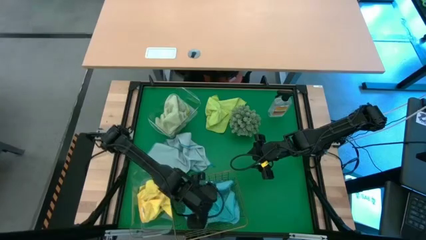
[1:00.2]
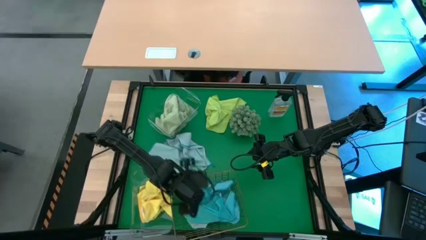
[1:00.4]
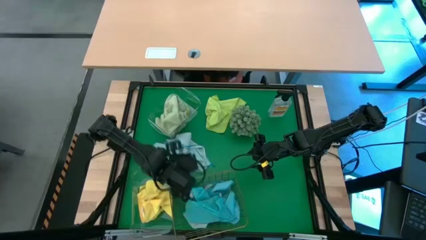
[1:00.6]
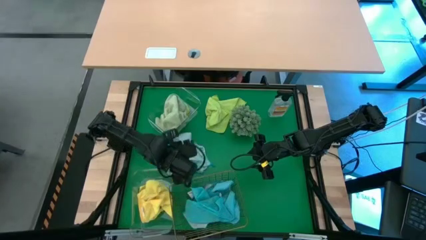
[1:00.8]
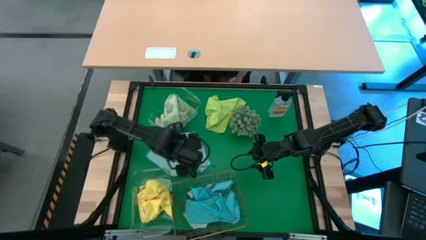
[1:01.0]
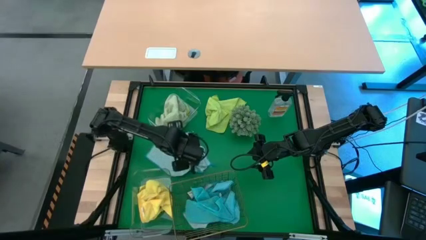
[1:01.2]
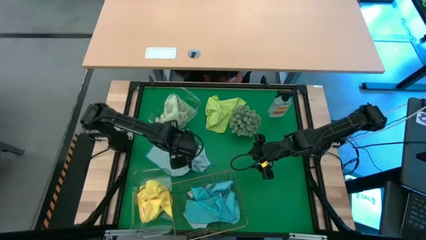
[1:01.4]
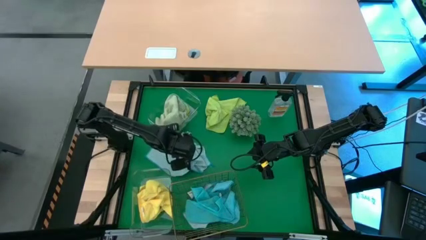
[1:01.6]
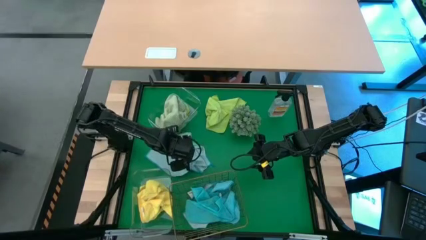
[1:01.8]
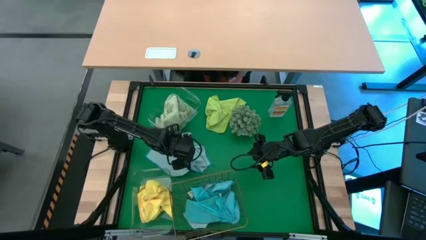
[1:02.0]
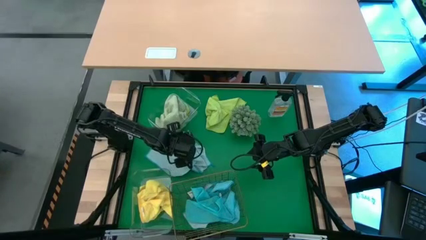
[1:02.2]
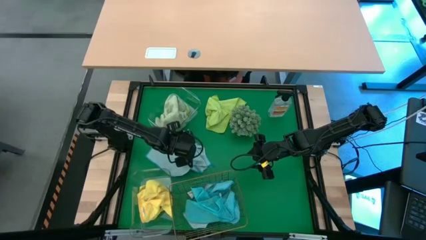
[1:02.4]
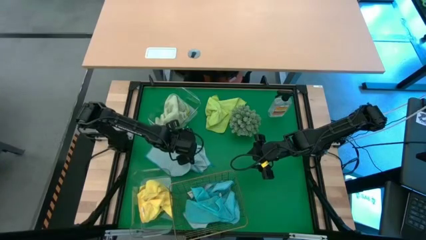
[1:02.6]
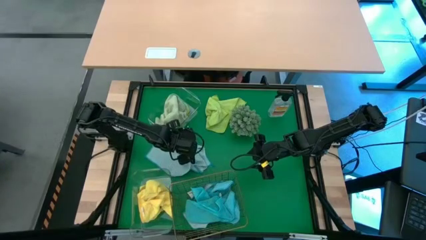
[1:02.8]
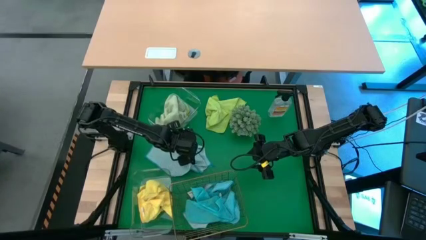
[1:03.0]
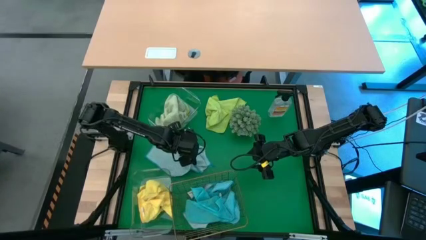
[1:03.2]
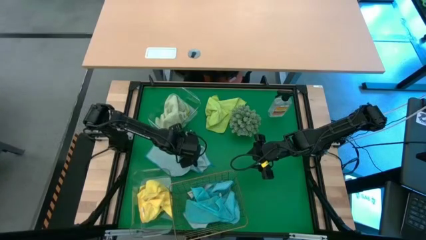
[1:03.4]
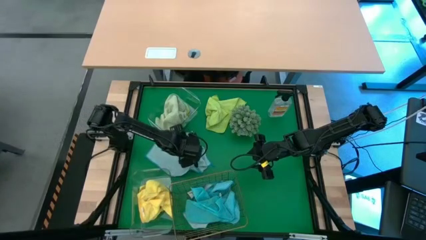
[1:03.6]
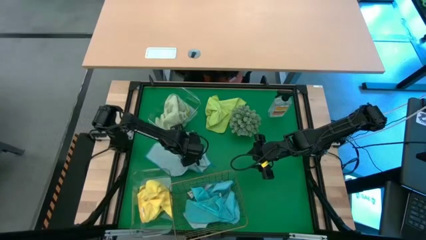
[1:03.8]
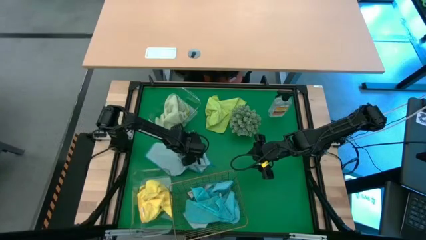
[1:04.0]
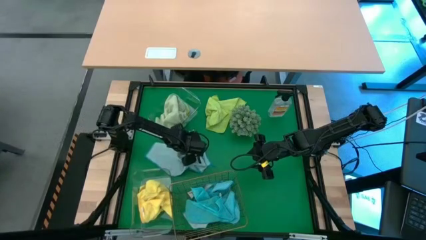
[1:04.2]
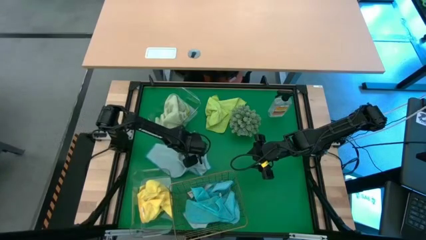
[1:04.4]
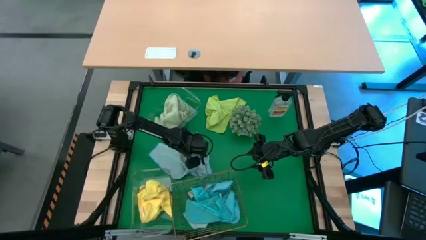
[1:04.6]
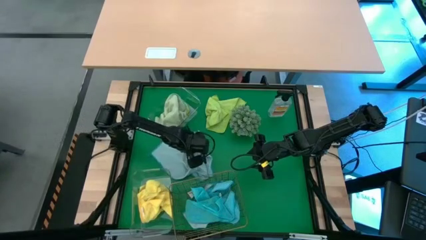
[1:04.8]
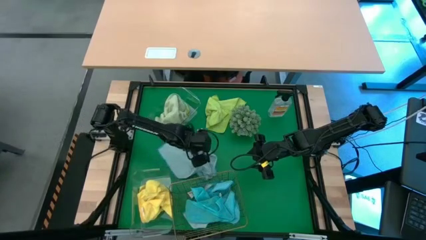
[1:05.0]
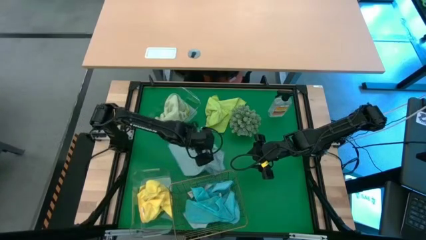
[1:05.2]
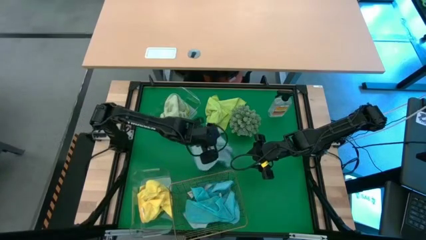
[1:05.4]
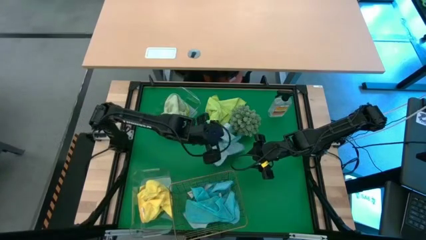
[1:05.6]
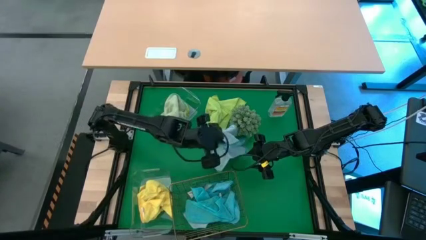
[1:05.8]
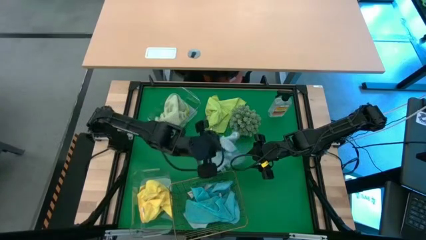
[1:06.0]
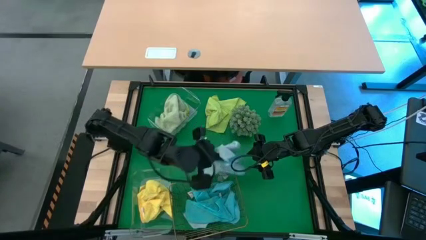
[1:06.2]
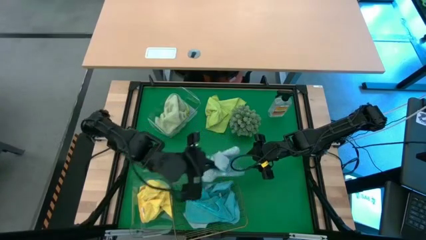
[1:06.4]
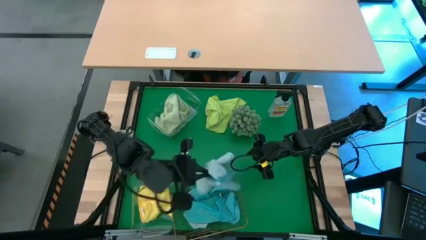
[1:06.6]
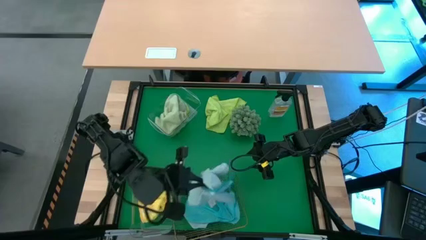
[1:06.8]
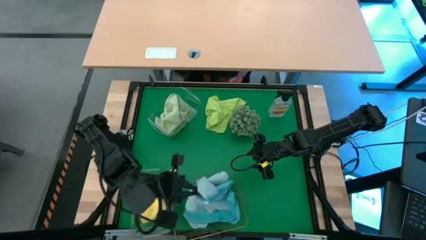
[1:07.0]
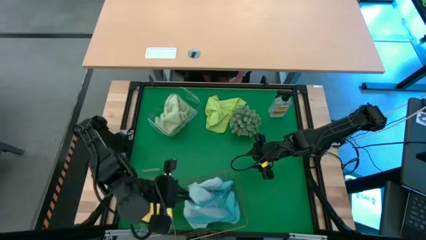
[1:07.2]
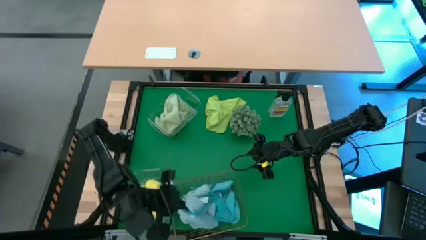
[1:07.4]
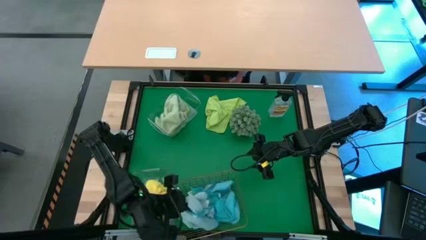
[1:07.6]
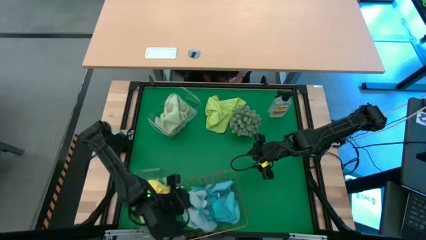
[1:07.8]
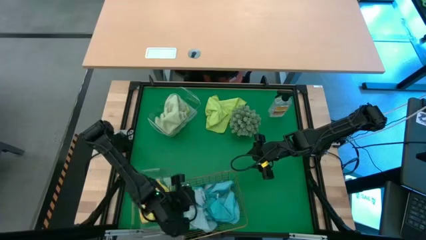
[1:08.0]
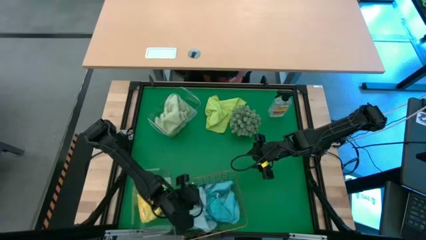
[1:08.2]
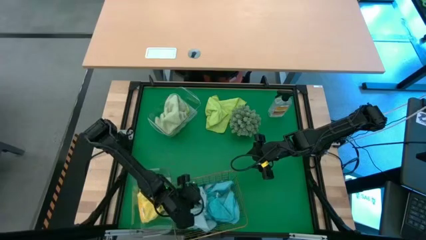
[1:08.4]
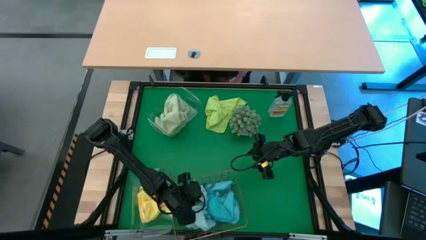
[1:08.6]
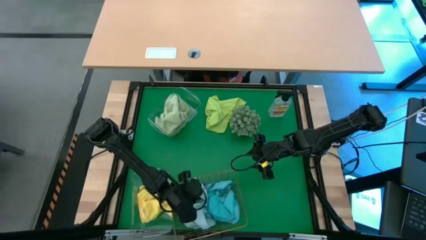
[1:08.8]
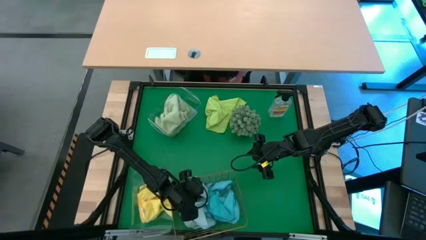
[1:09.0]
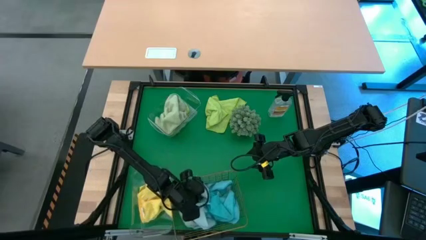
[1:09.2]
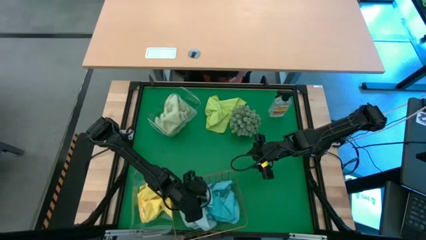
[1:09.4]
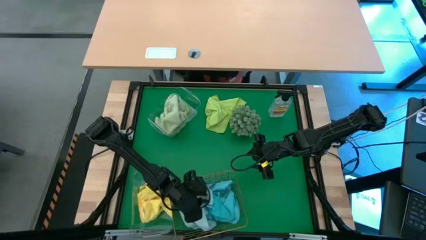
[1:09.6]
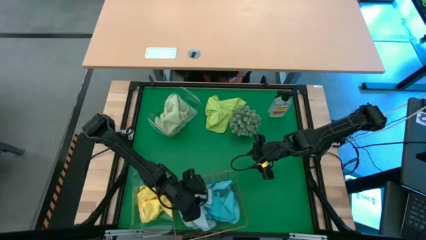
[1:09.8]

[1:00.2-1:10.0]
Task: Sort microfiber towel by color & place in baskets
Put the light blue microfiber towel into the wire basket

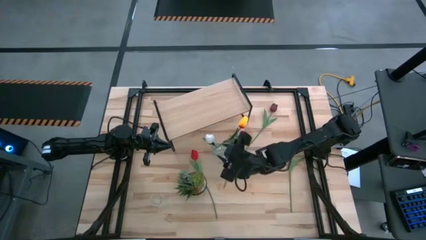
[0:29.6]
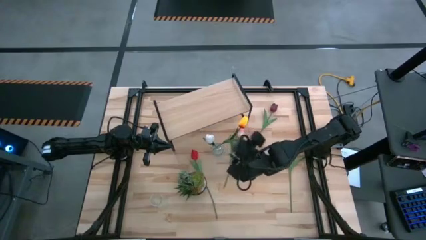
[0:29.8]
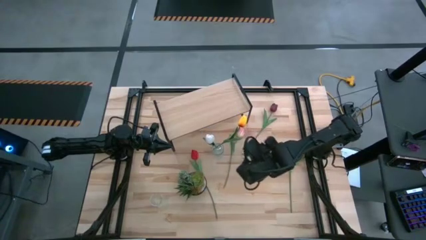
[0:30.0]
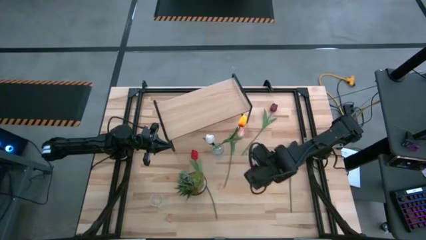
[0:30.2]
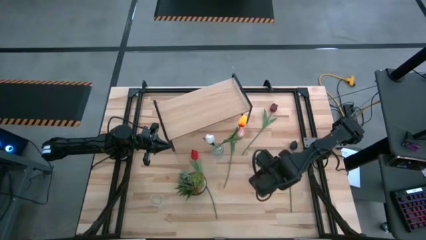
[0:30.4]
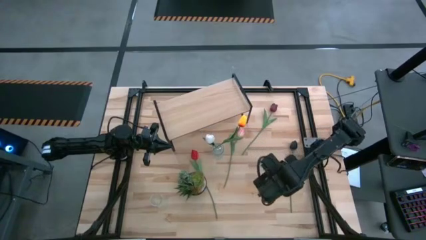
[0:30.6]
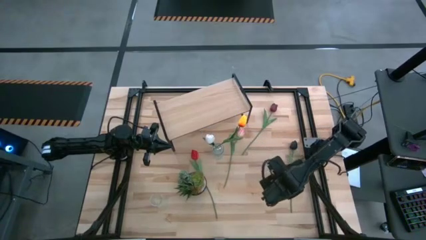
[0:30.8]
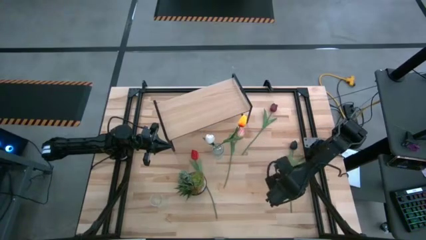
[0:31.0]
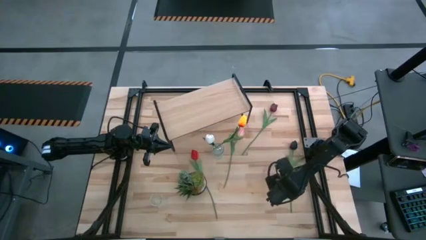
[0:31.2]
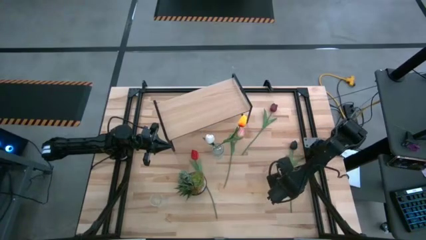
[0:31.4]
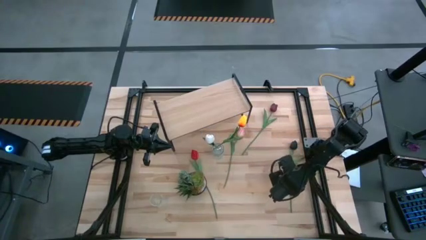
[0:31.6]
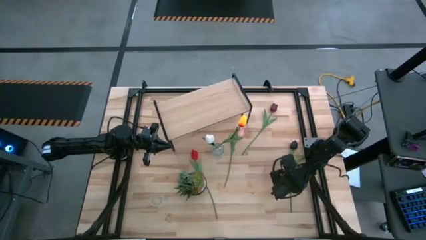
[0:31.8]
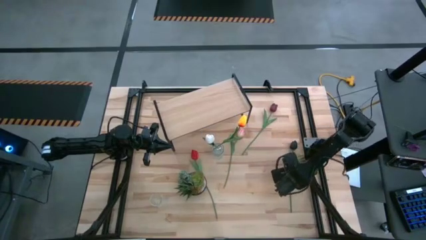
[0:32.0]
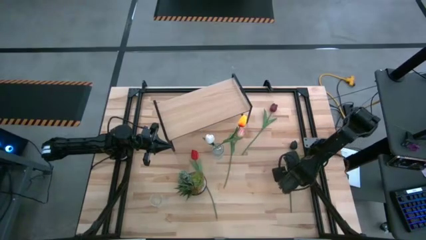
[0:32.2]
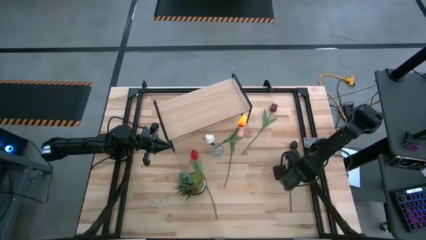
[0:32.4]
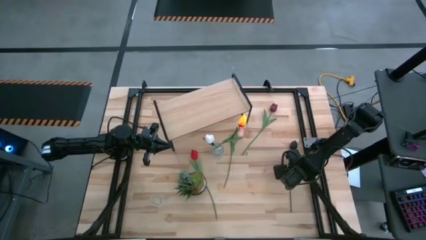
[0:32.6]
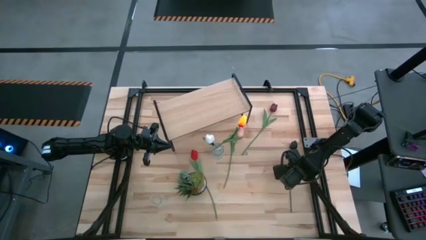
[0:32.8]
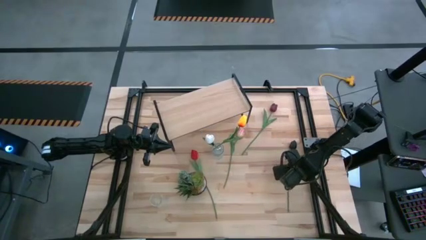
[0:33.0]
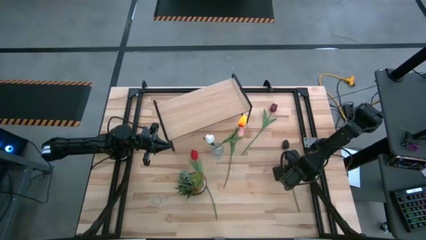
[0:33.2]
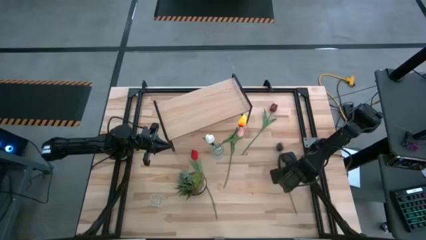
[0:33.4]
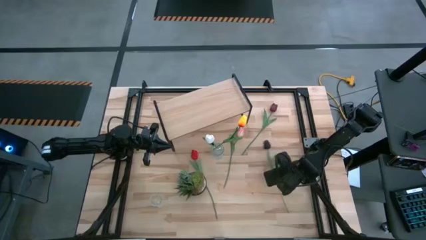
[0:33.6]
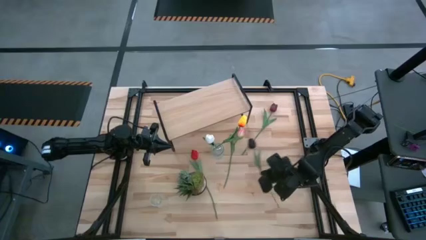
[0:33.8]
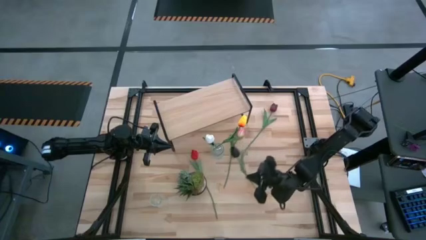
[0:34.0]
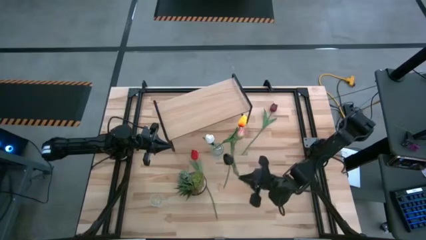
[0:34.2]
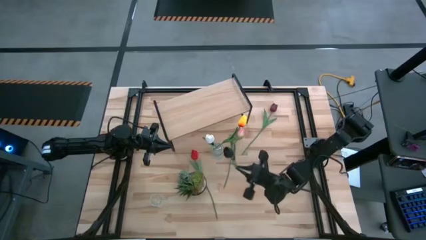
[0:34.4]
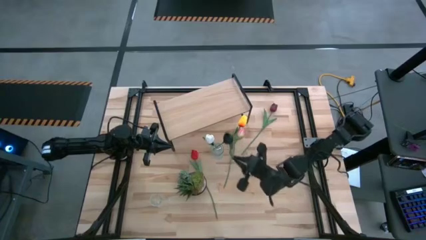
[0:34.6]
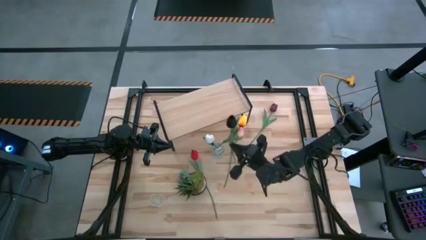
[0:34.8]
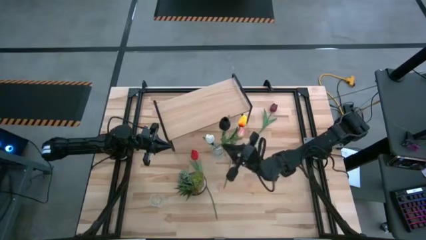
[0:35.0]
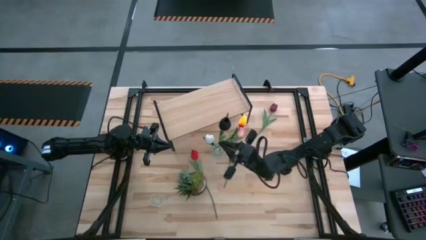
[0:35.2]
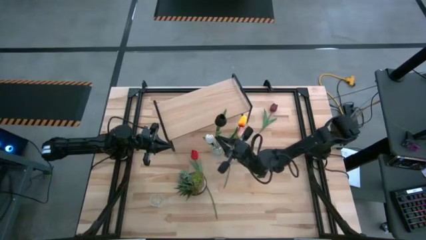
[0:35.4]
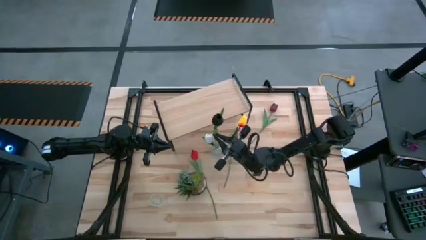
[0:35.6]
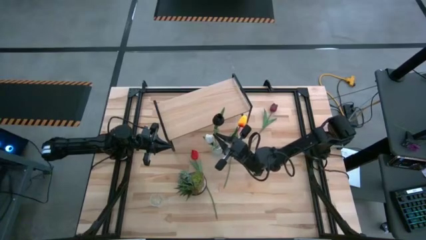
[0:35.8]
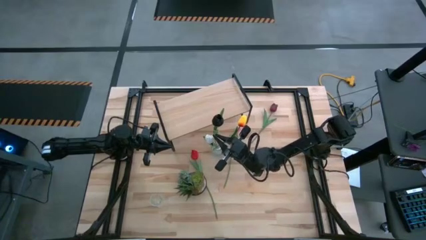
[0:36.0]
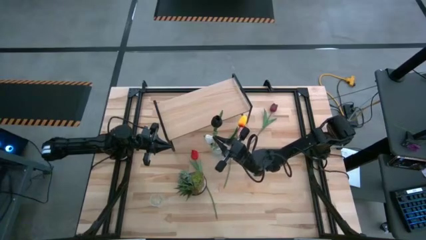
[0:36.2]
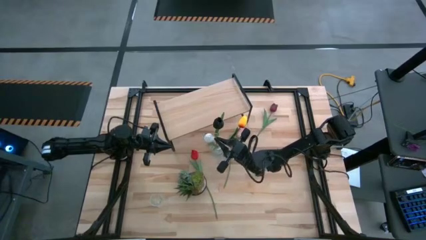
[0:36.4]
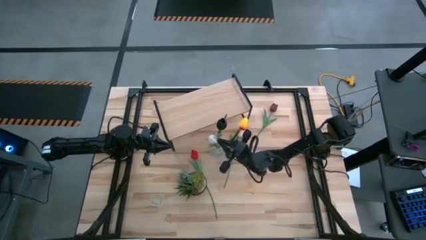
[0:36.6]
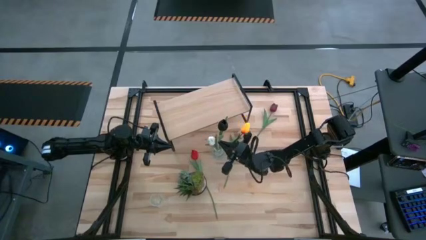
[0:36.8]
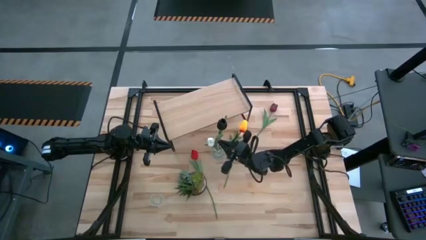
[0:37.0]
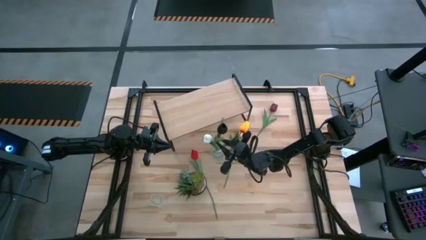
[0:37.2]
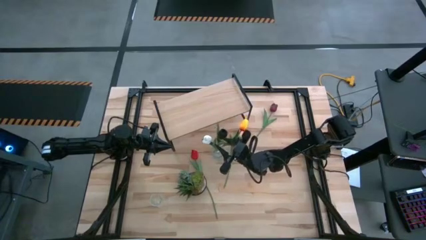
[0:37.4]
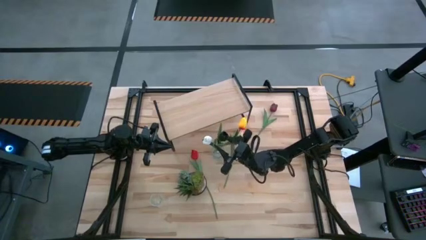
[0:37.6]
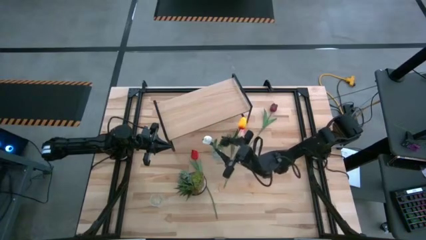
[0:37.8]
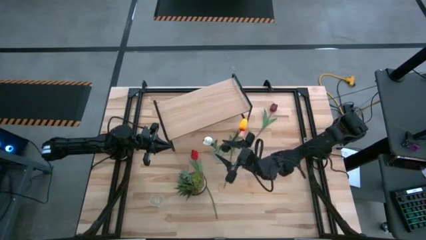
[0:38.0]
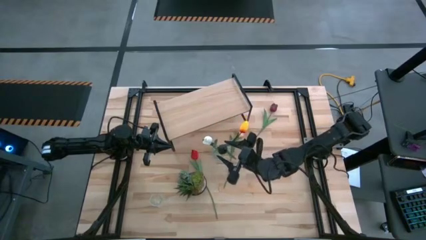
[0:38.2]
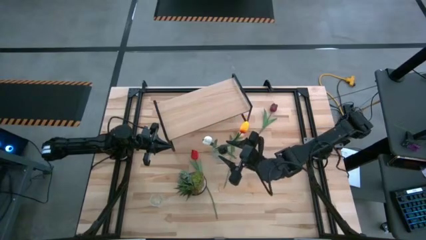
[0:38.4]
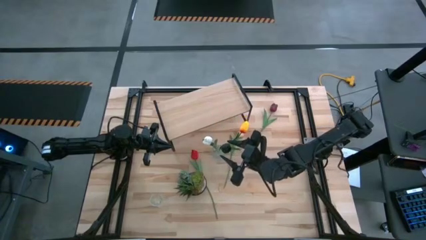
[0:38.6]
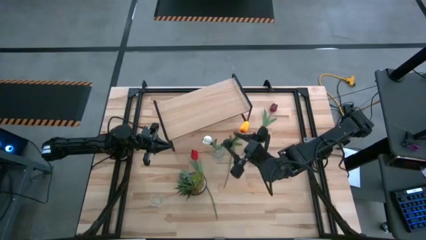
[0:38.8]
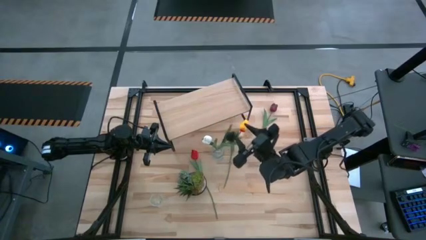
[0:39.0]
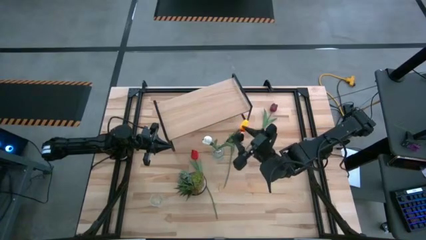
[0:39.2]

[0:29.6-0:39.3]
Task: Pick and place flowers into a vace then onto a shelf
Put the black tulip into the top transparent vase
